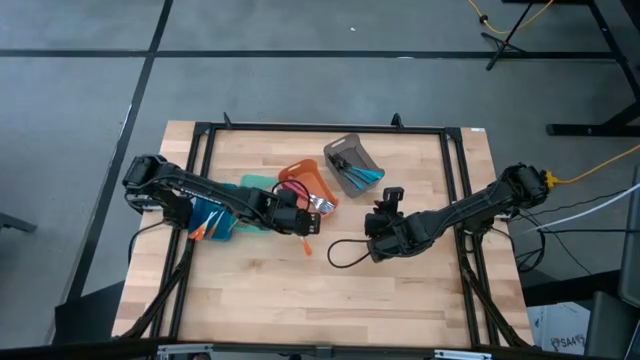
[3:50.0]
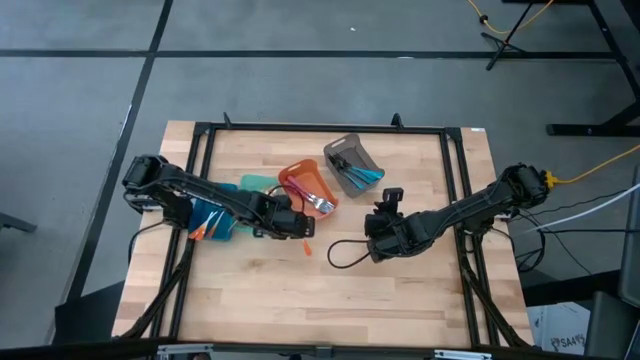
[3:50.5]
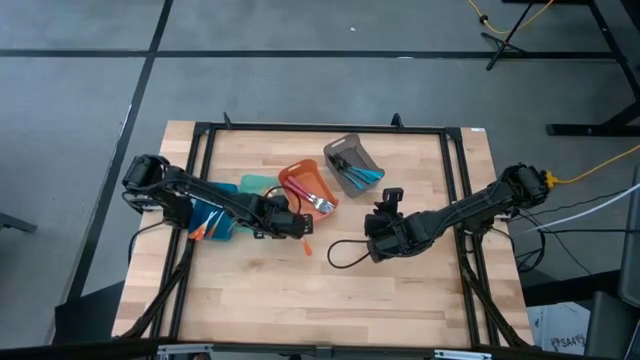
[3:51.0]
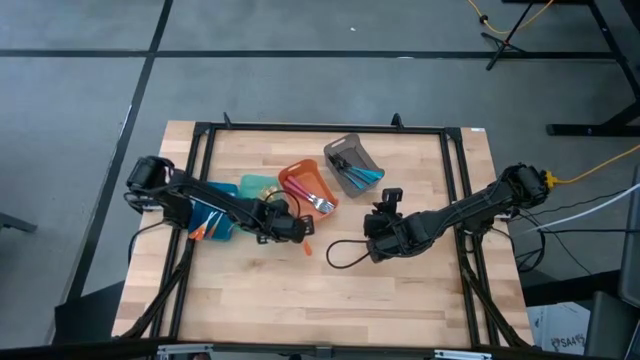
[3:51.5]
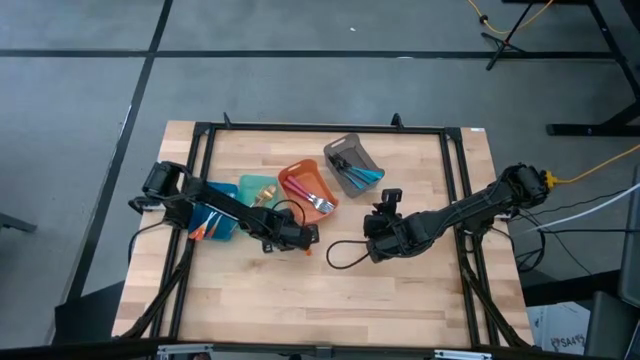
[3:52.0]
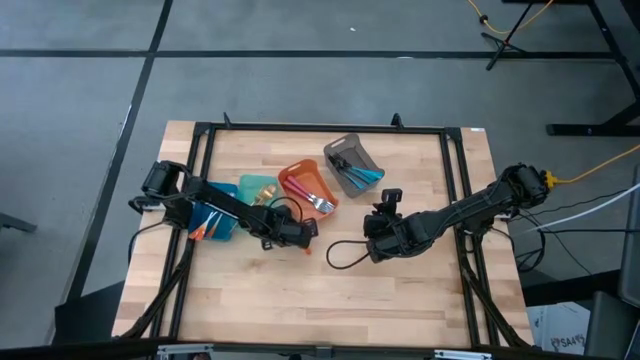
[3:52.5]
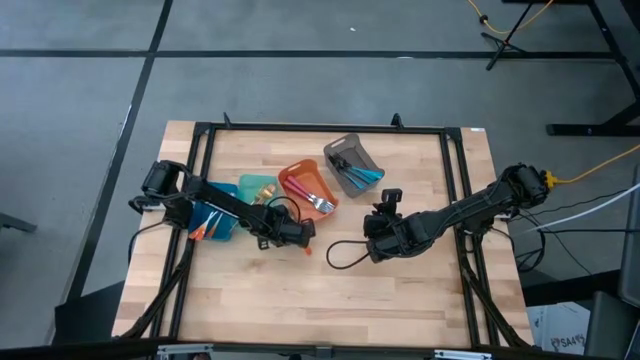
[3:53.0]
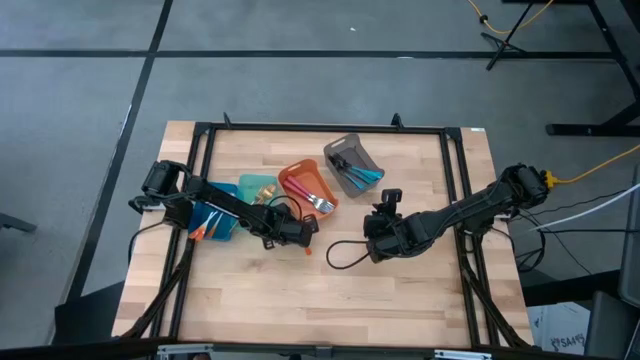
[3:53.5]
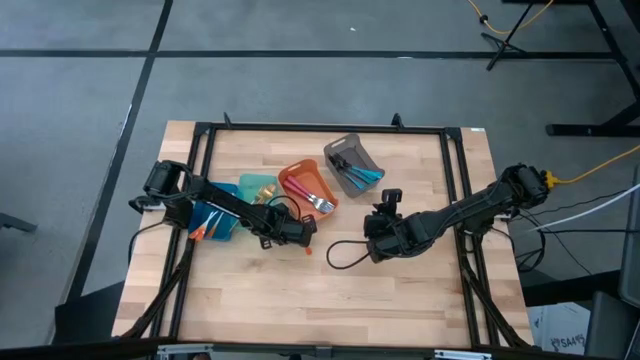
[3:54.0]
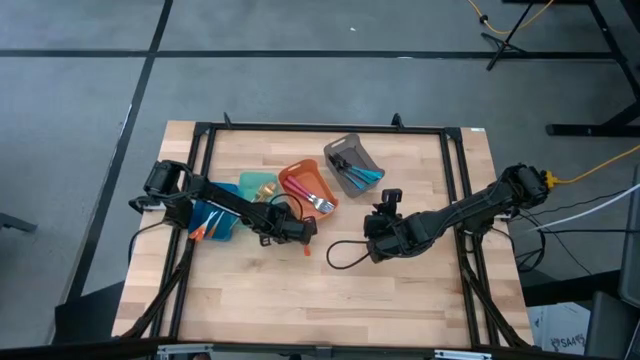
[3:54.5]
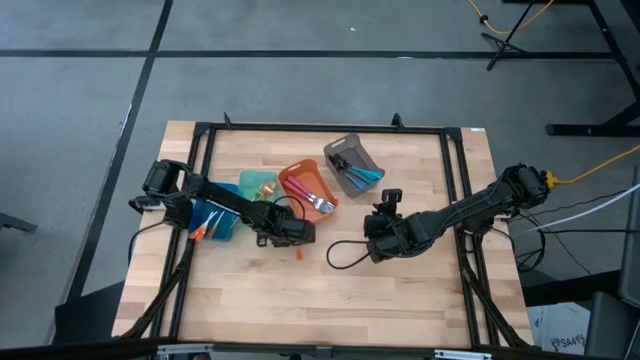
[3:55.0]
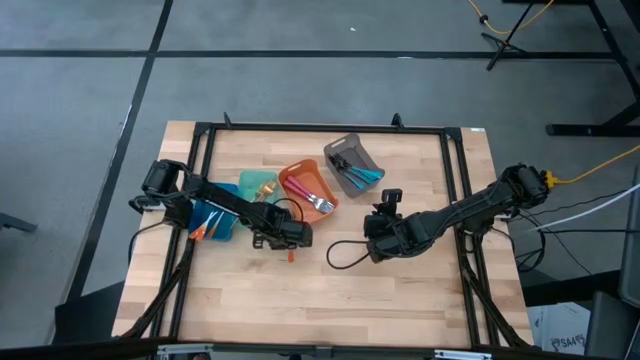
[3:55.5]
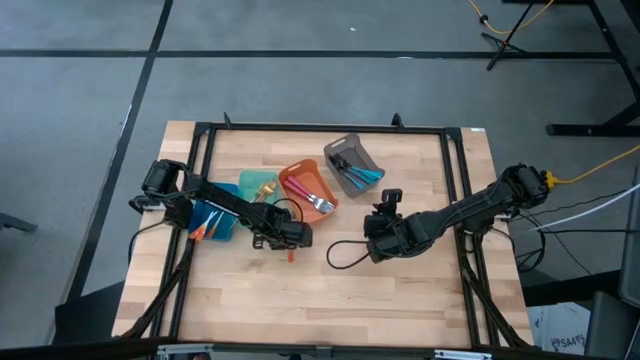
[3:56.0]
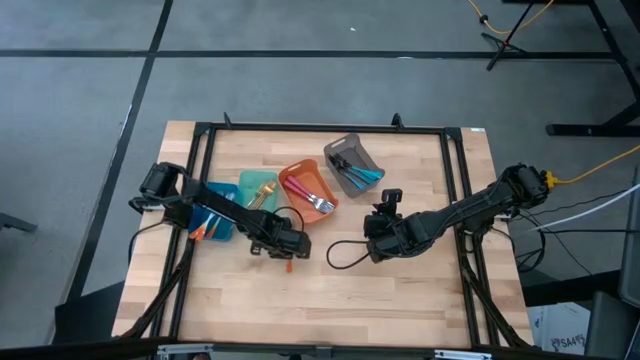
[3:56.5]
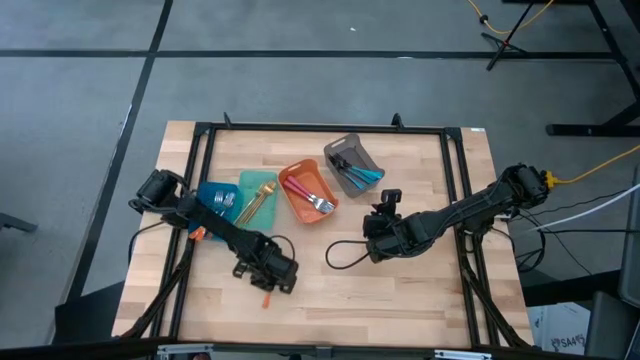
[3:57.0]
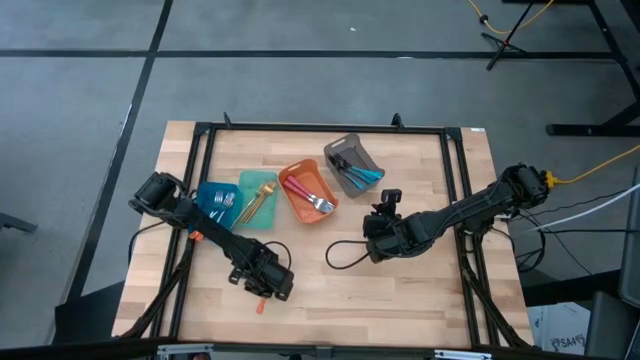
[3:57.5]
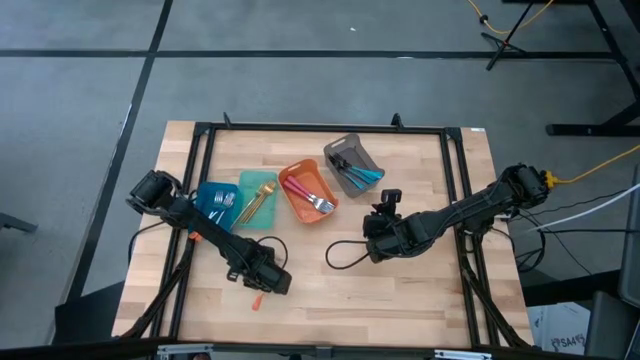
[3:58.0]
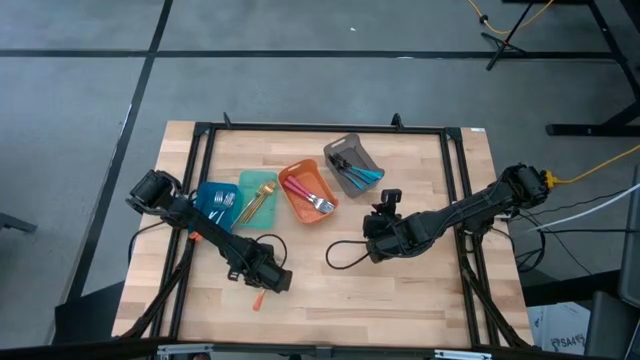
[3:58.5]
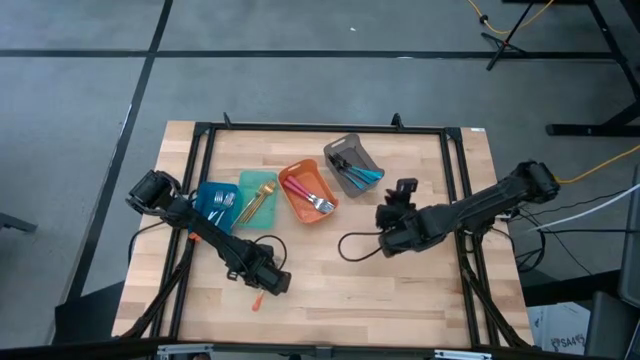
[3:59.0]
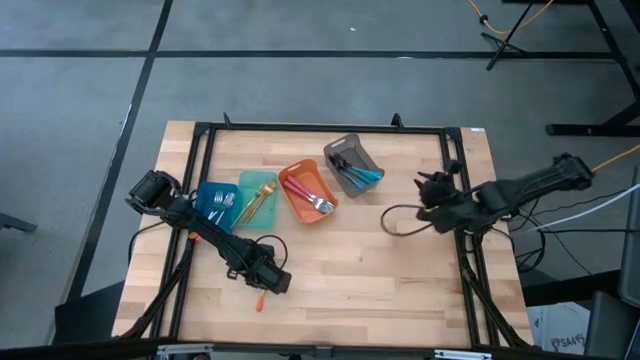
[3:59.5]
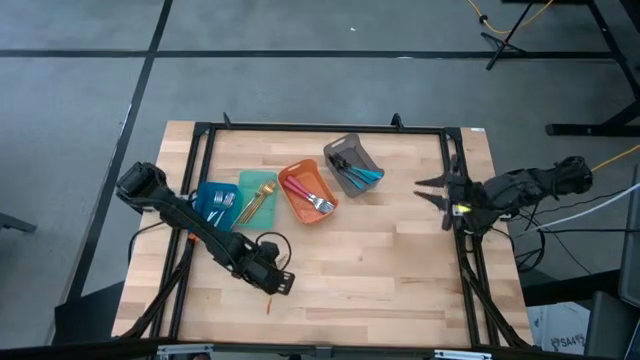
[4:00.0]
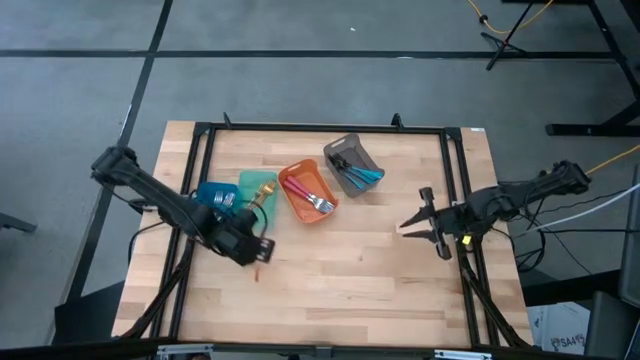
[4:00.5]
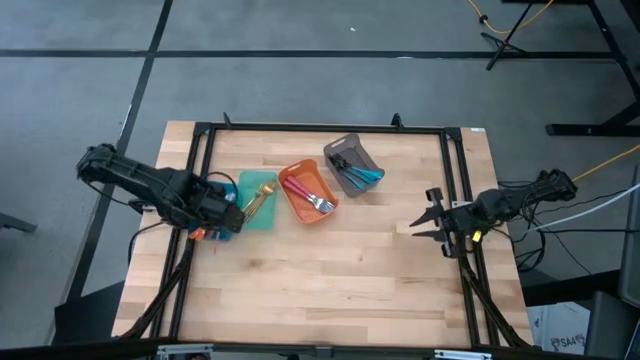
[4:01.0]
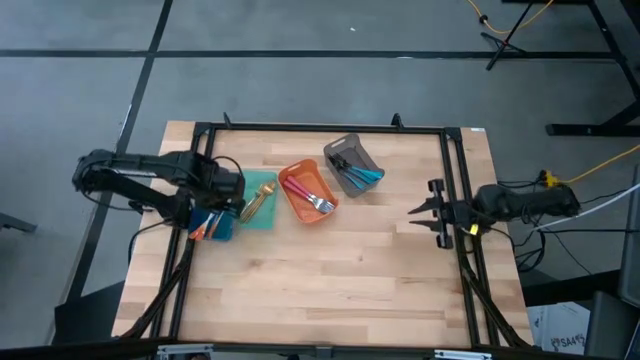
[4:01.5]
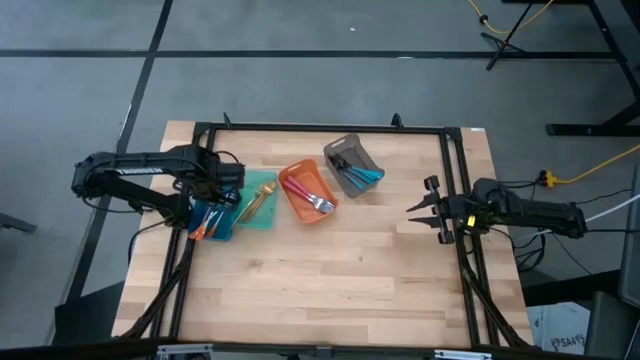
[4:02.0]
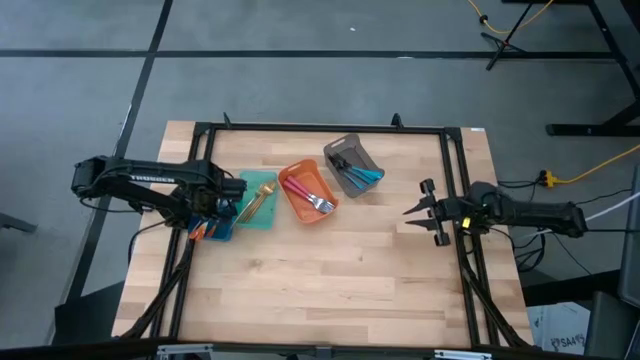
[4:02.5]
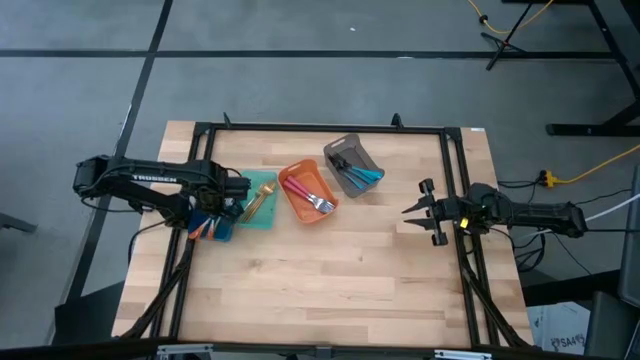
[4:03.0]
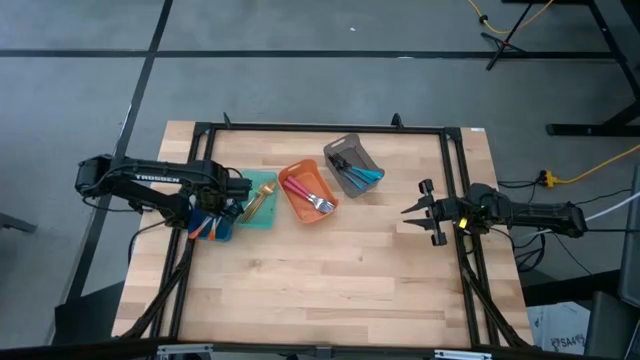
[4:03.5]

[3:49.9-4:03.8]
Task: Sort silverware by color (type)
Put the orange fork into the blue bin

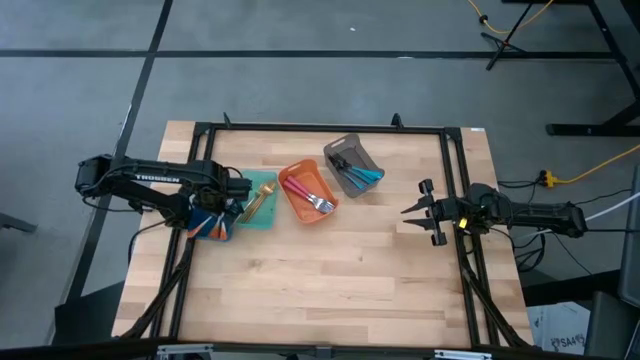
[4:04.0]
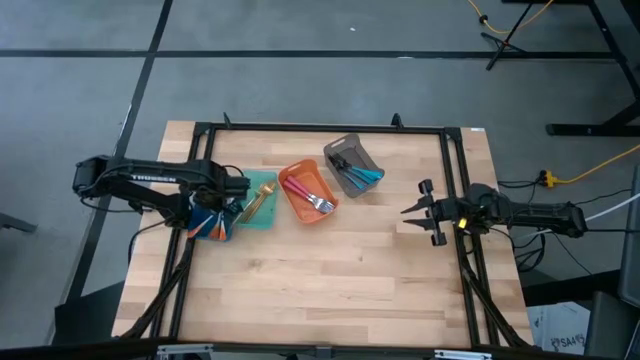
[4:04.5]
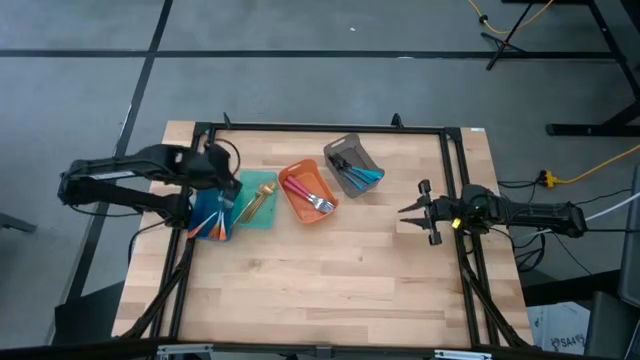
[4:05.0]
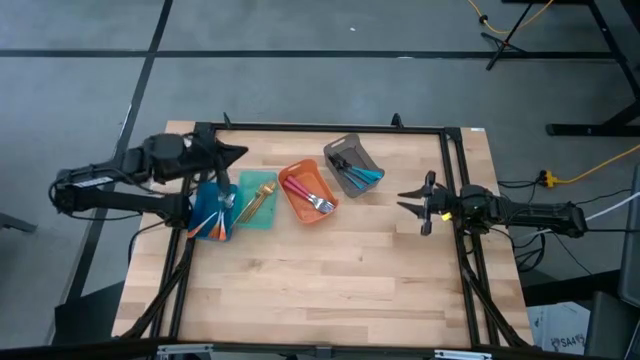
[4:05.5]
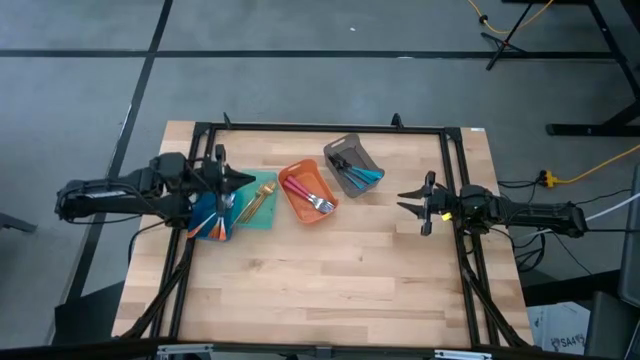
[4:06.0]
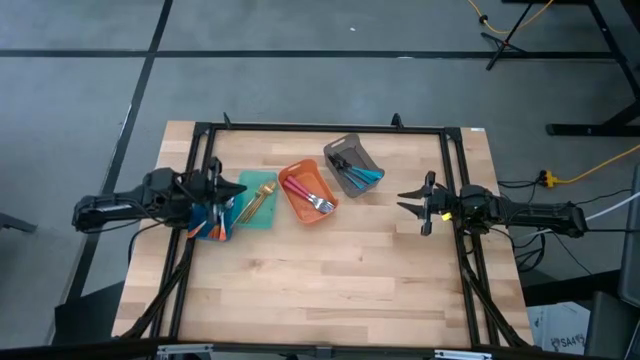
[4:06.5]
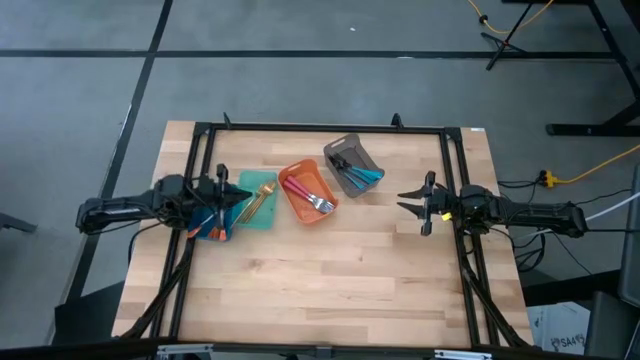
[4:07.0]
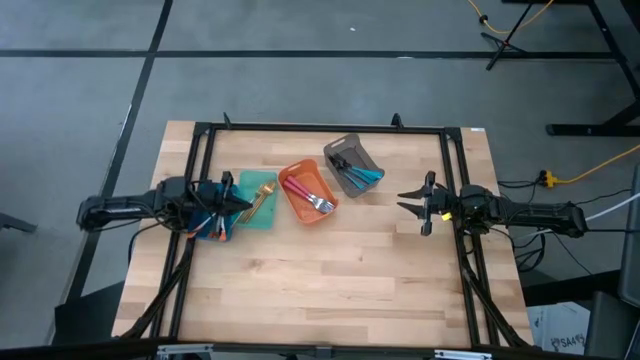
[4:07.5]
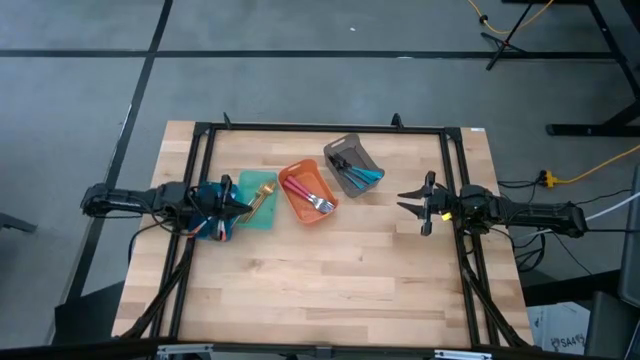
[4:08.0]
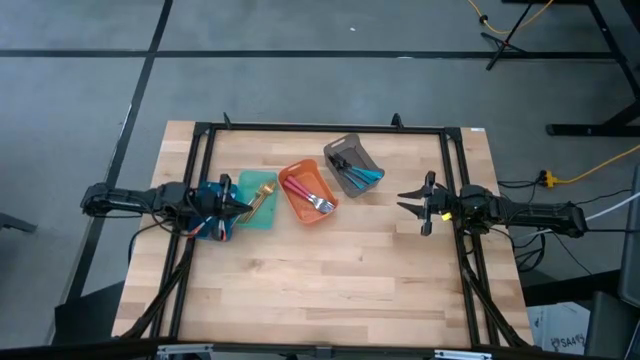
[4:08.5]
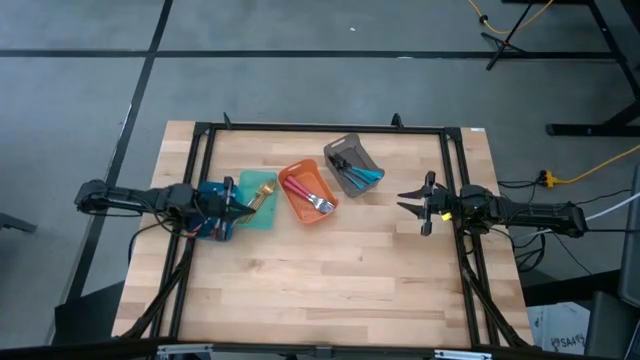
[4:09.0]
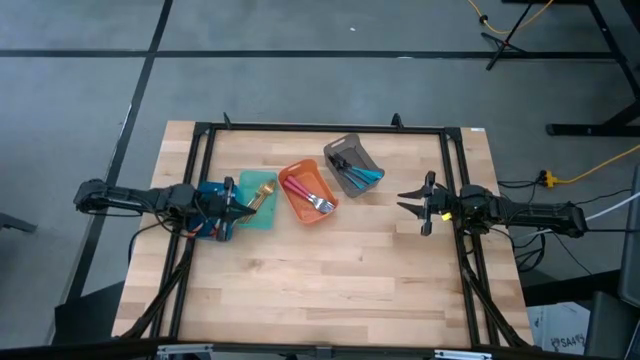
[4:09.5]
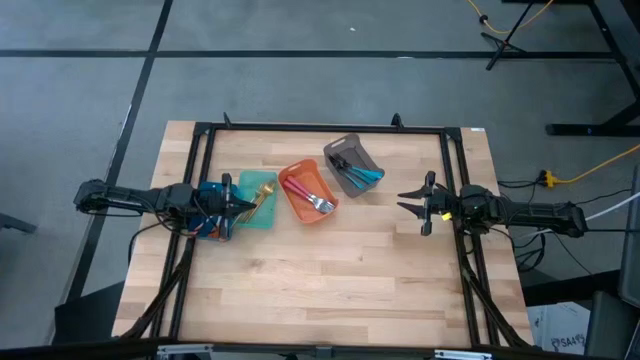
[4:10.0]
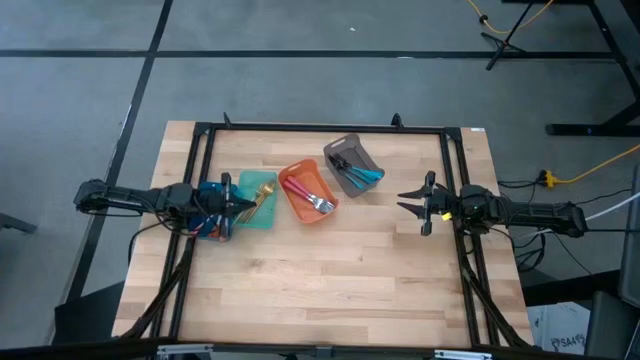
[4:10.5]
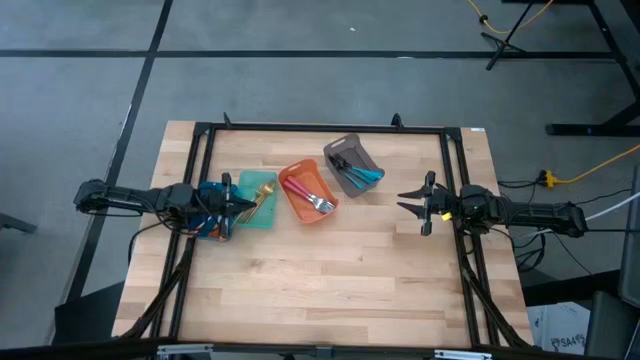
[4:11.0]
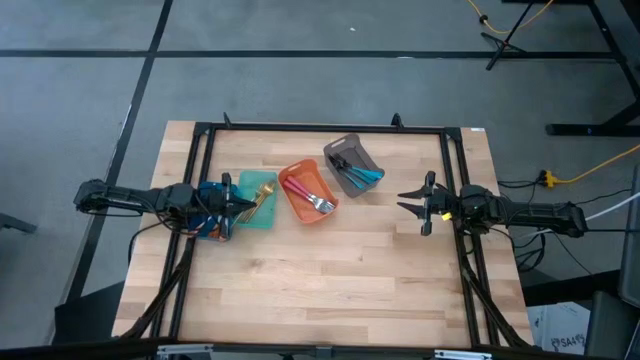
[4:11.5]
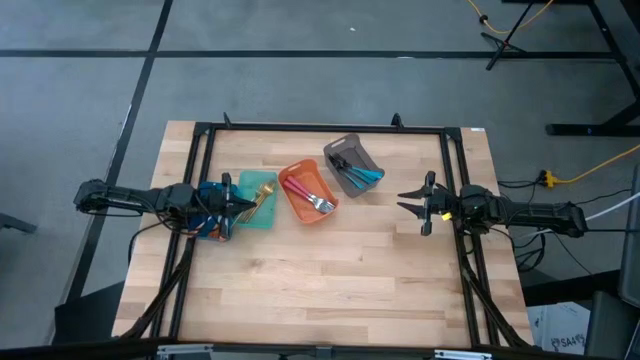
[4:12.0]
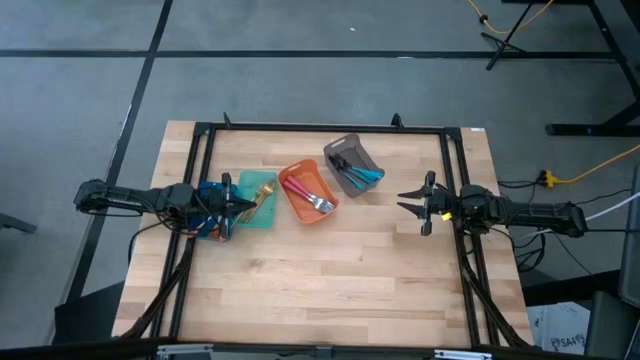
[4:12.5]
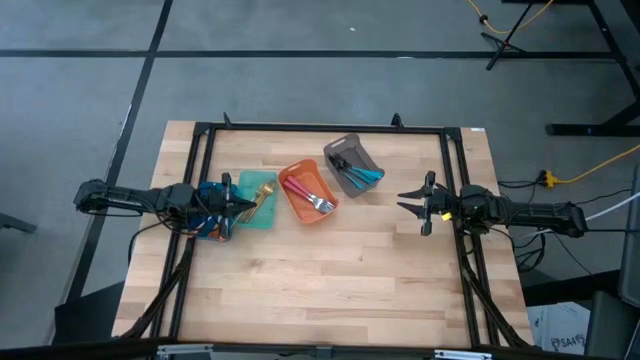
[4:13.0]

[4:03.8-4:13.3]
Return to Home Position
